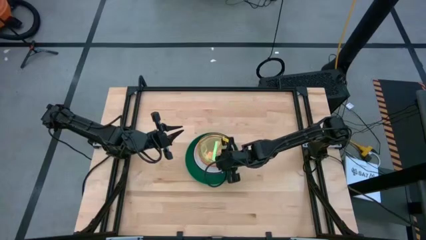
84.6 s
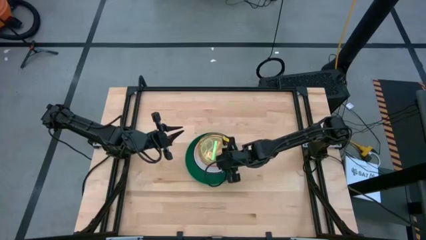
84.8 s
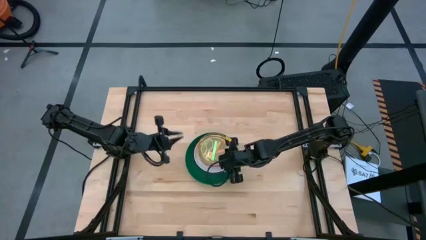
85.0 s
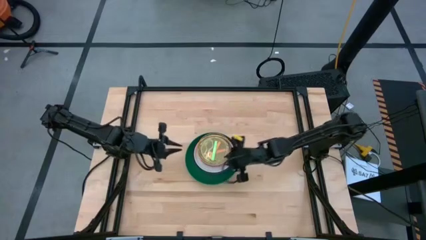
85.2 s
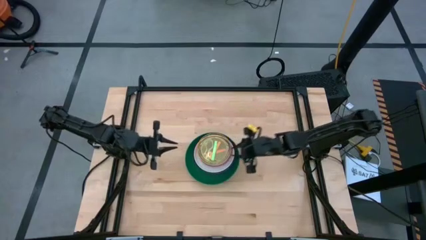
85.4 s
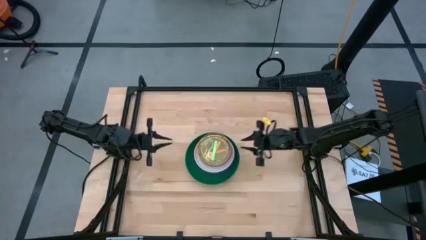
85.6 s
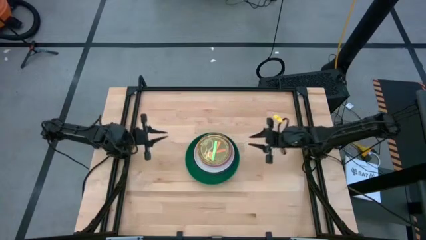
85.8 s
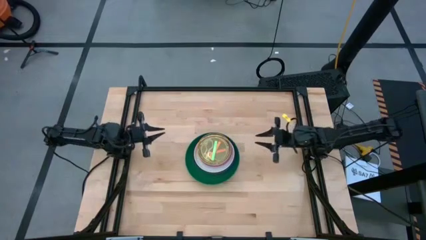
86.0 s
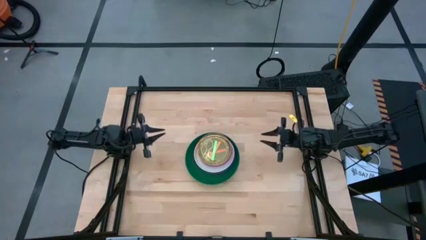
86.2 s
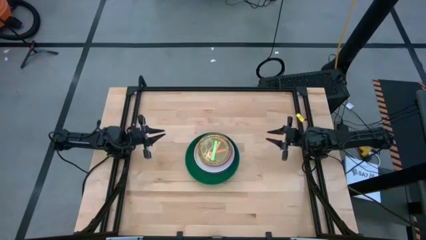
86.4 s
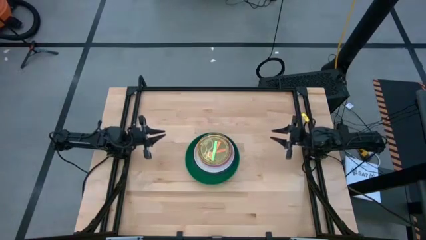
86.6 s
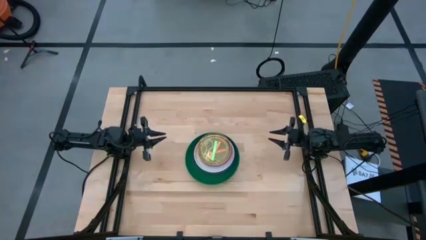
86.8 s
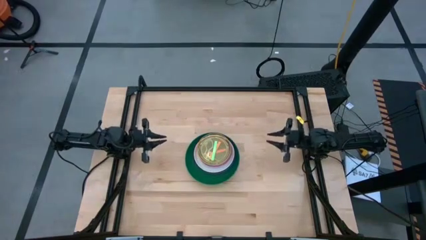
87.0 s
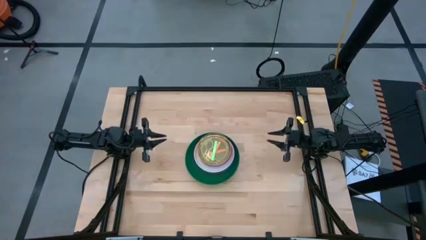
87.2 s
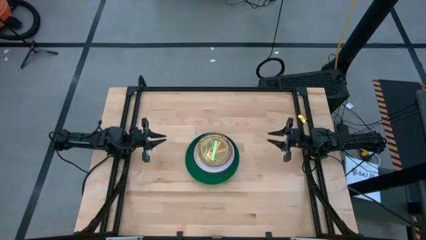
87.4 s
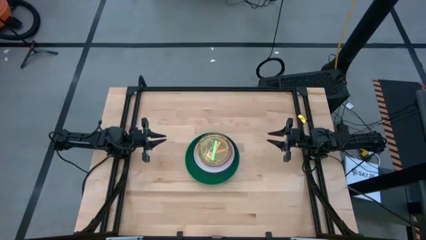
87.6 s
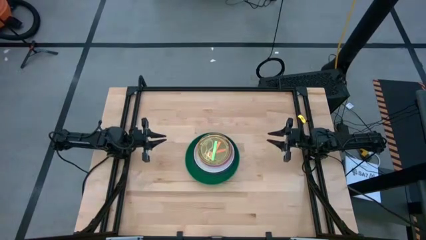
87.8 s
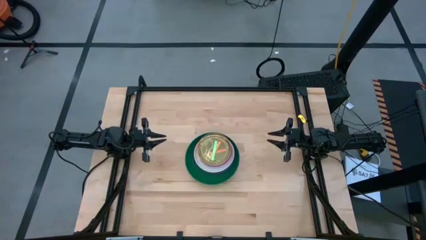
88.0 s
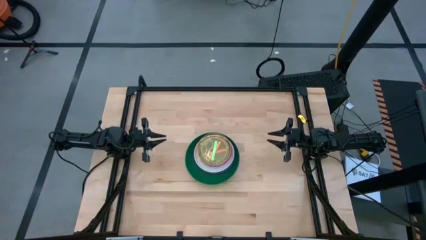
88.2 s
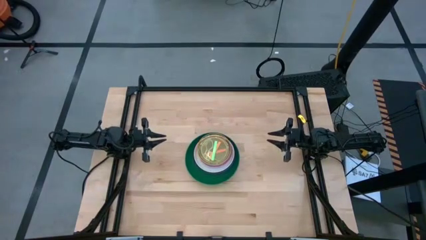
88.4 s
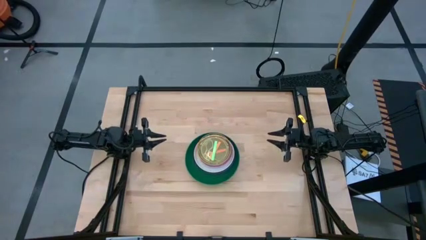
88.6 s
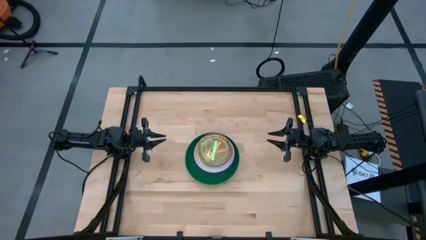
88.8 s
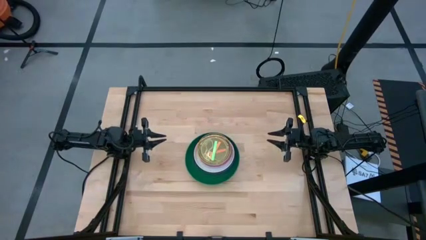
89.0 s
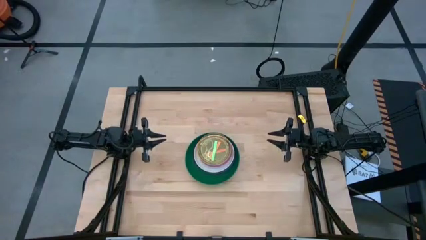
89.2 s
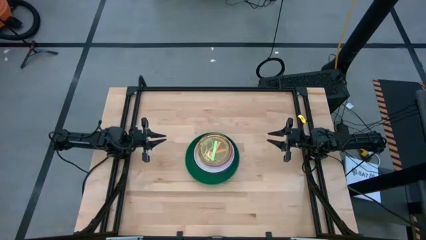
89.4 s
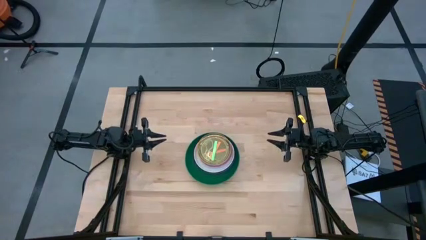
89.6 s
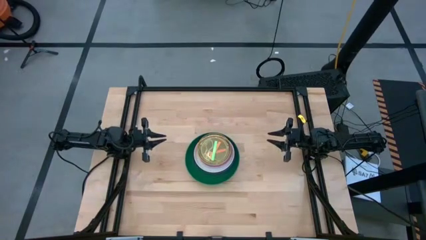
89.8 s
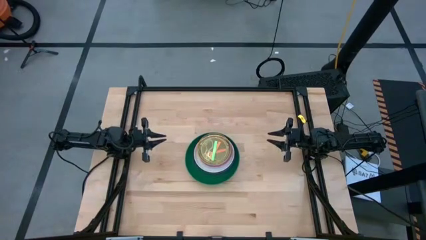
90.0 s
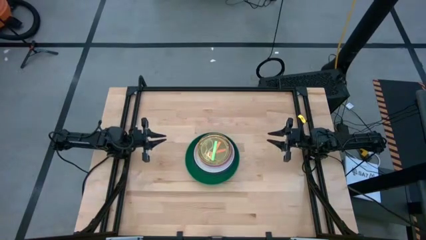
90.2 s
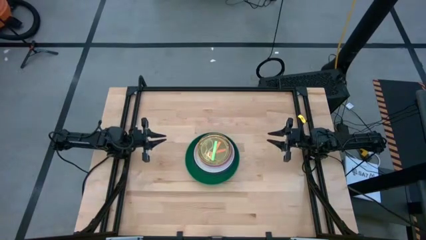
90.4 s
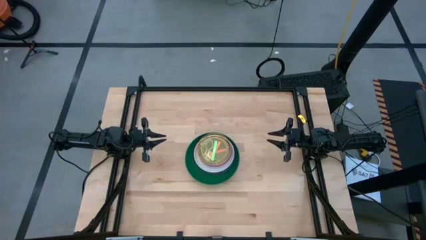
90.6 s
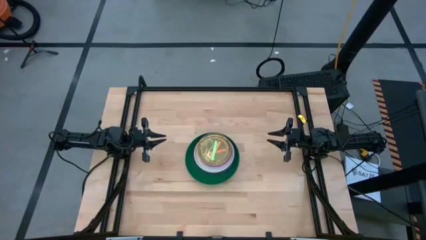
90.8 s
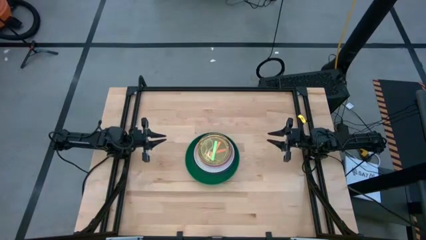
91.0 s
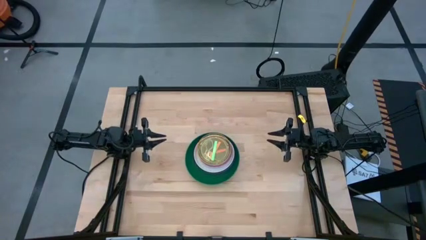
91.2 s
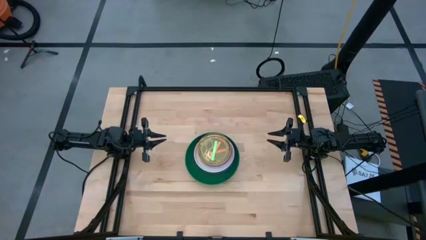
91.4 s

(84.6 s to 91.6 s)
Task: Stack plastic plates
Return to Home Position

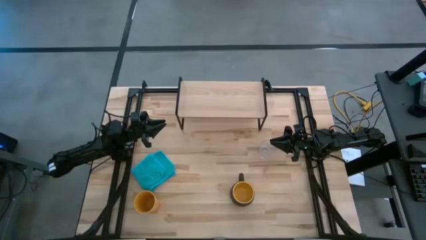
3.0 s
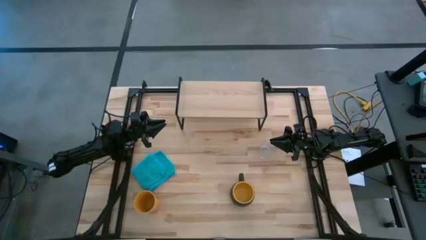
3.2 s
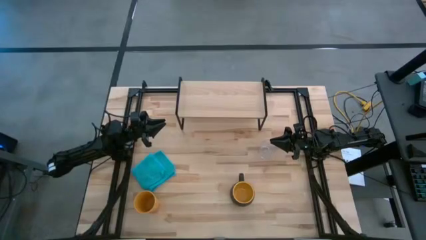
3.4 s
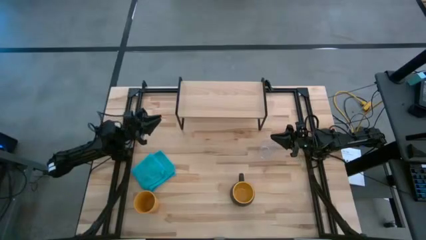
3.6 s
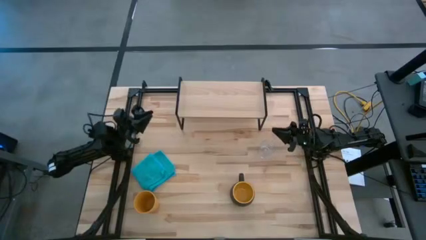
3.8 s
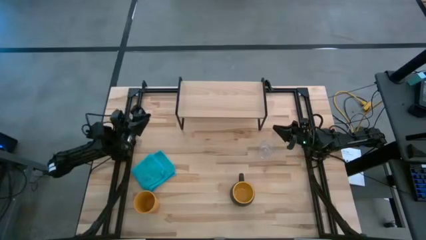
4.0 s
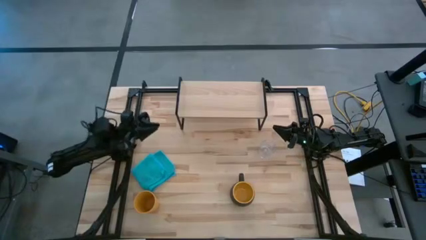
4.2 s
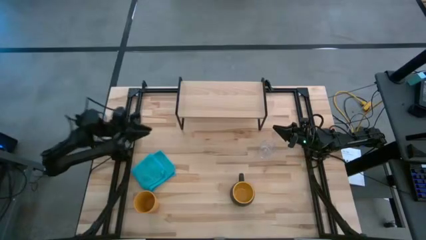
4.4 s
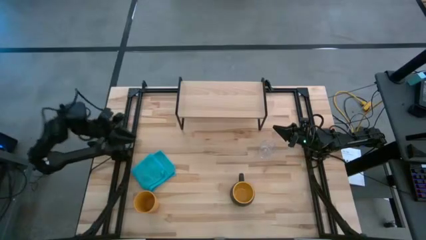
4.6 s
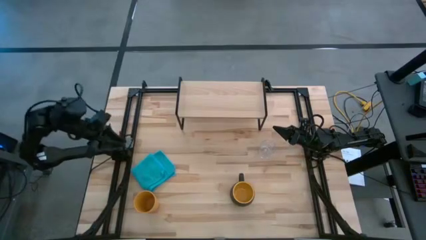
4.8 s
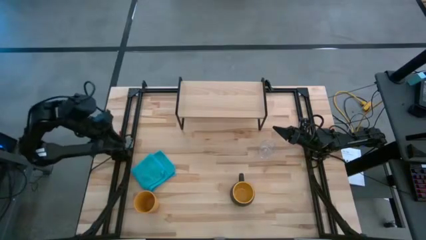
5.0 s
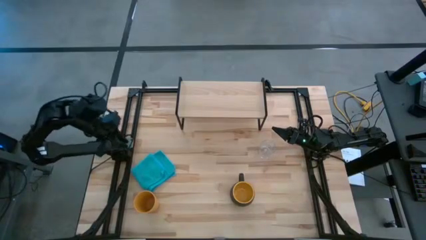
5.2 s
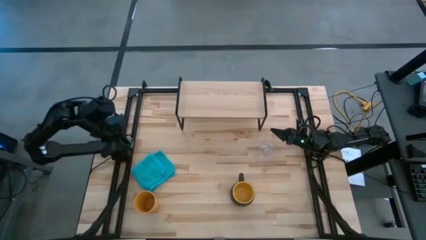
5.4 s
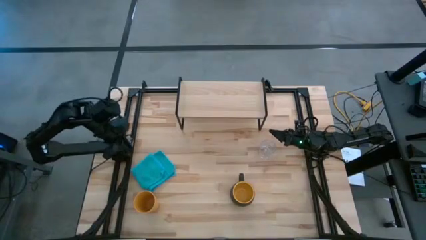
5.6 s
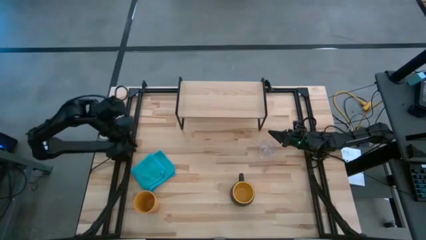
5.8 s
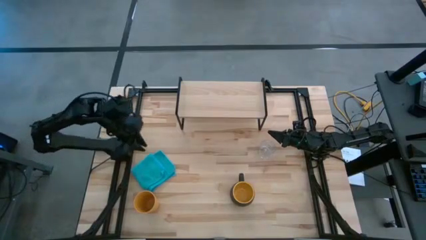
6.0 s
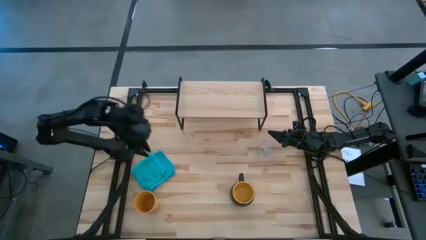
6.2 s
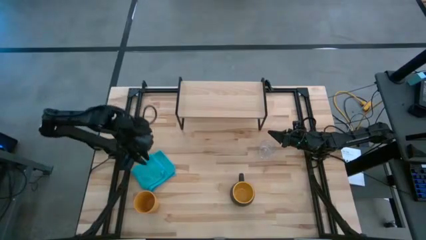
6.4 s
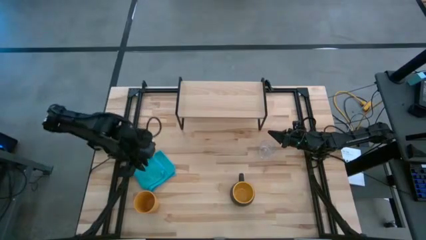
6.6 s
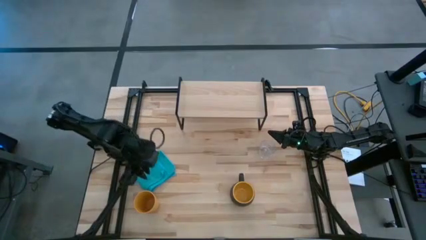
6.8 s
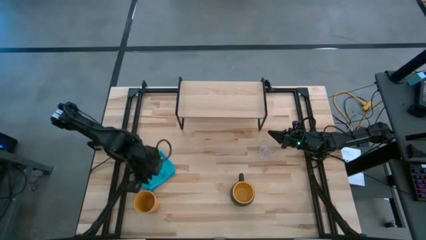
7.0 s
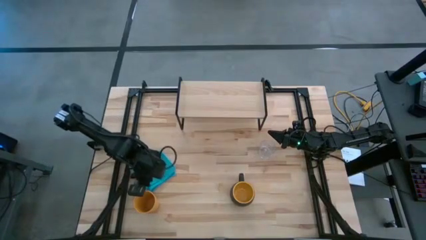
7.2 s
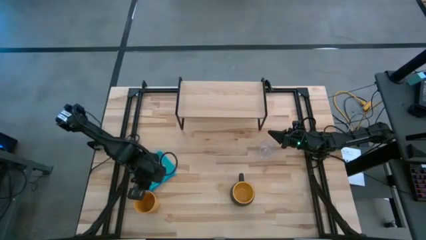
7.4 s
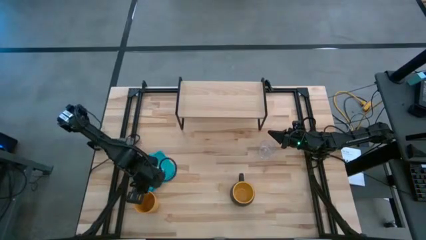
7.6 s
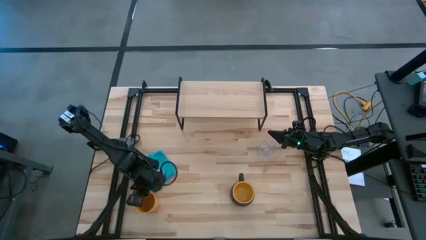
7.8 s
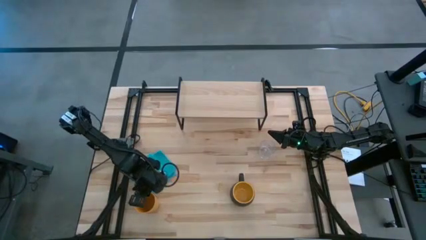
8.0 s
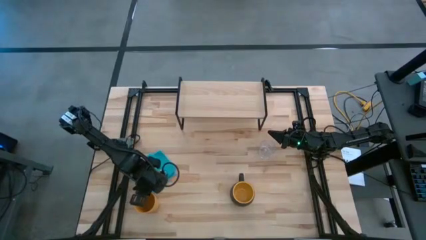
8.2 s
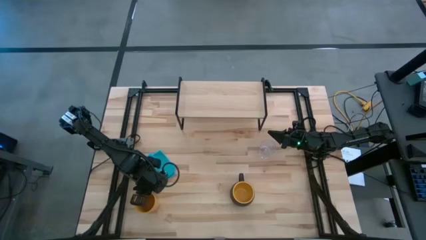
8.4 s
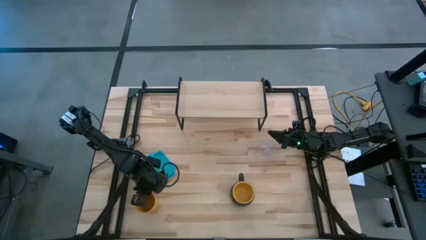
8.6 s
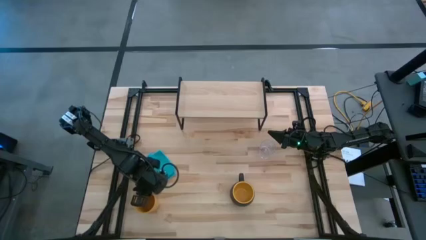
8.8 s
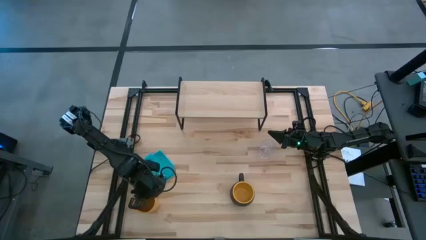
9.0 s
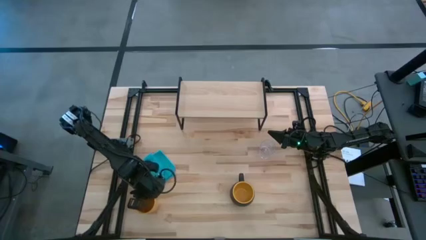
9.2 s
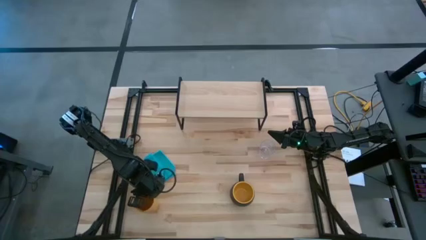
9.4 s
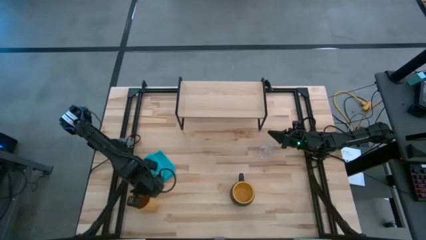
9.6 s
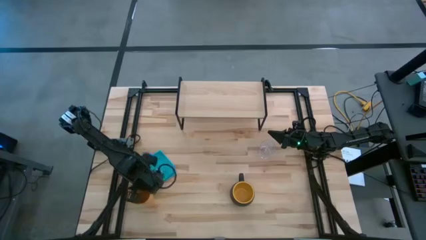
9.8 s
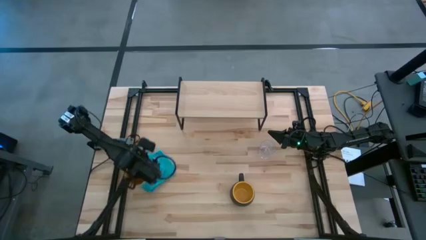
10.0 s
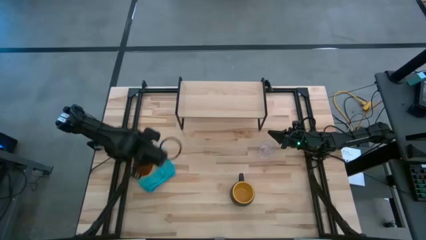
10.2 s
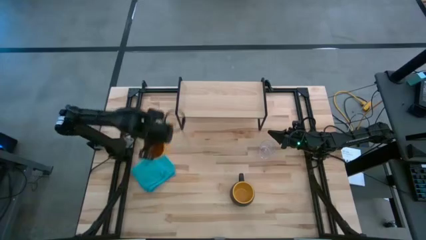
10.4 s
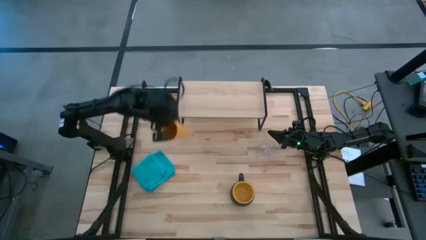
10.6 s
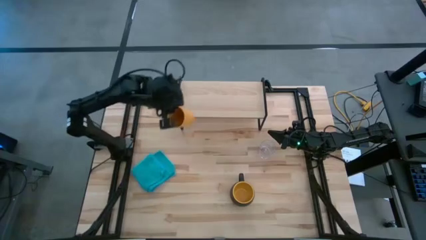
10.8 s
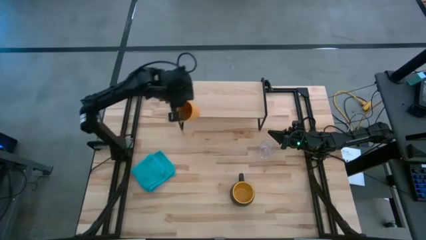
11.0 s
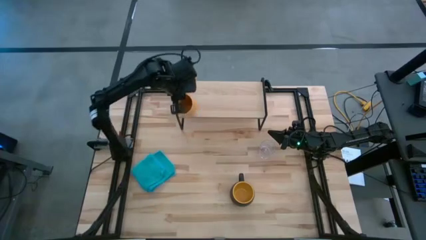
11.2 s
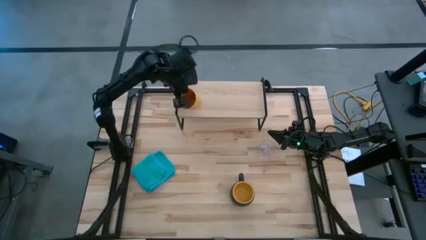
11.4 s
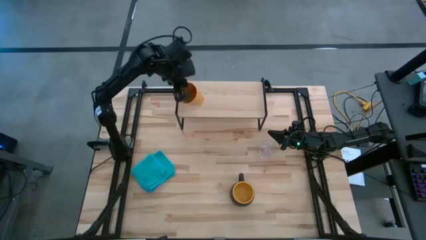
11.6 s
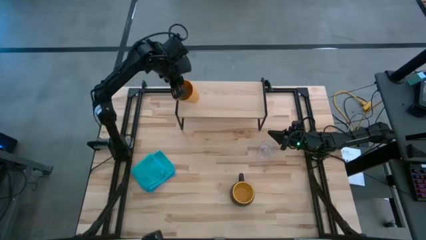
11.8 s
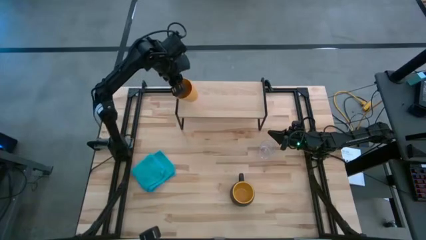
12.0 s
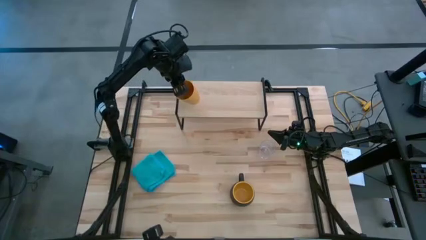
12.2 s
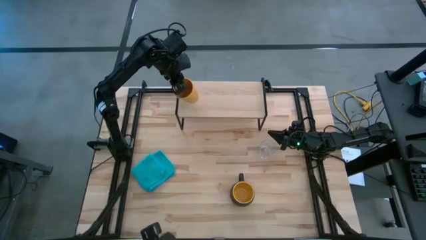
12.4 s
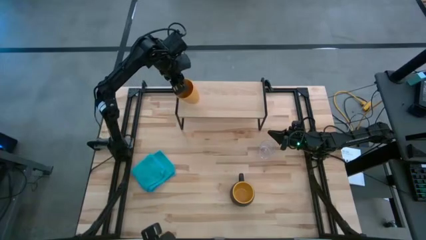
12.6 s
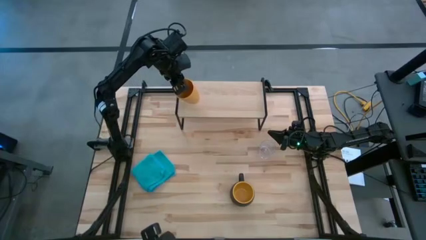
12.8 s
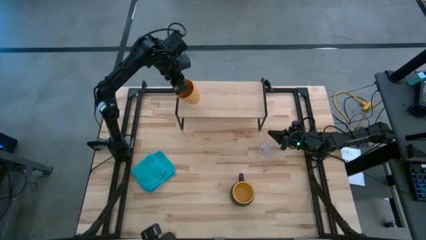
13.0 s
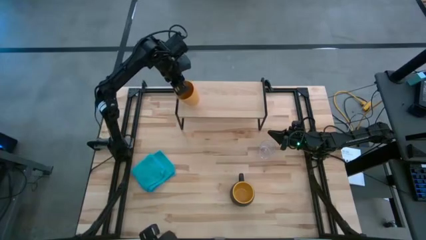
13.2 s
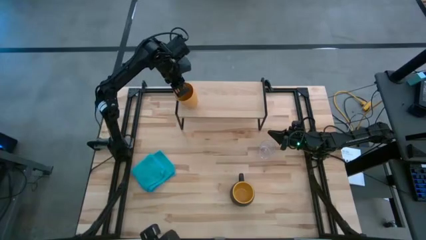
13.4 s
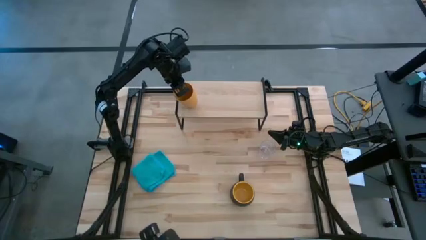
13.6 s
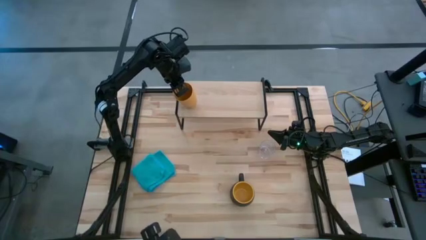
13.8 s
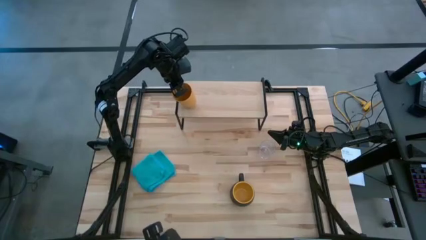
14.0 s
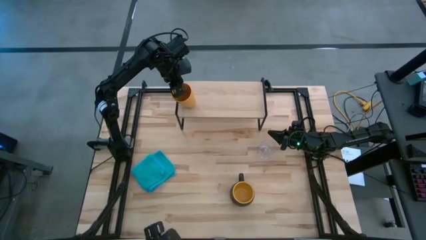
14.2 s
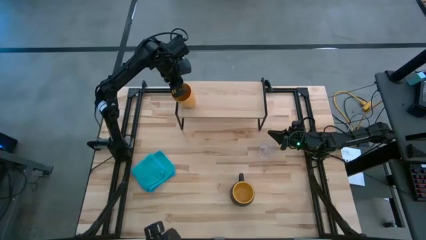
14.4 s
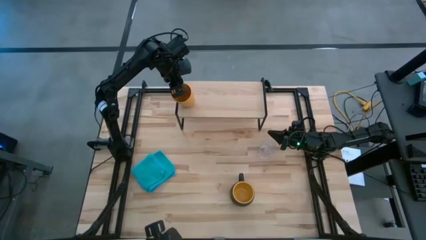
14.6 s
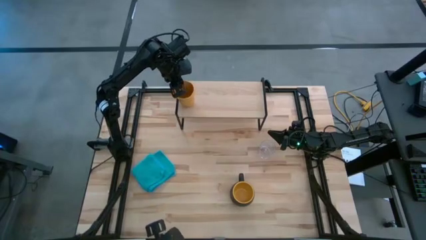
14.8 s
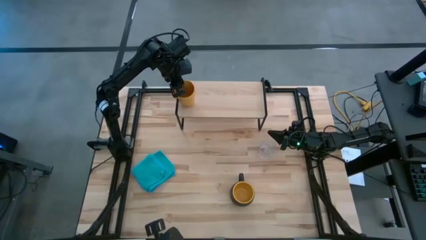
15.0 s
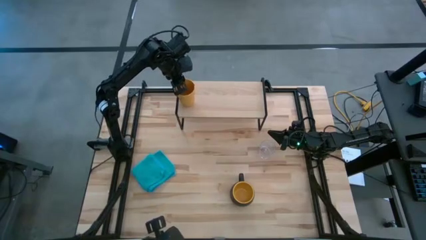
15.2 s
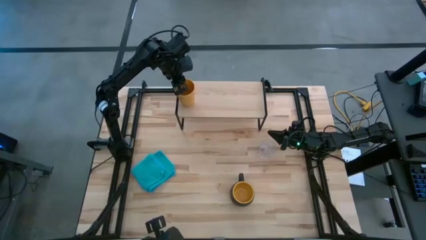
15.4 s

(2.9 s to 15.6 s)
Task: Stack small to large cups/mugs on shelf
Put the yellow cup on the shelf
